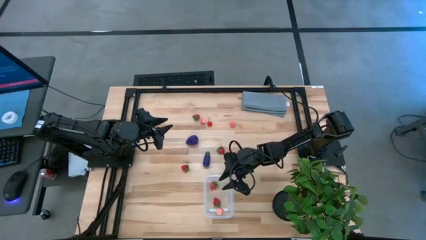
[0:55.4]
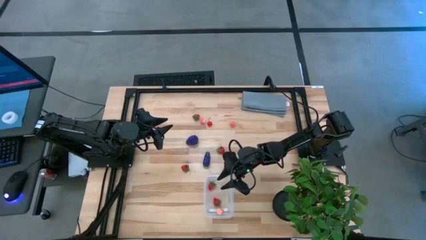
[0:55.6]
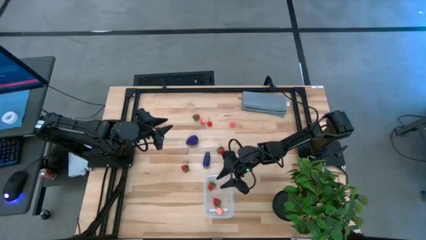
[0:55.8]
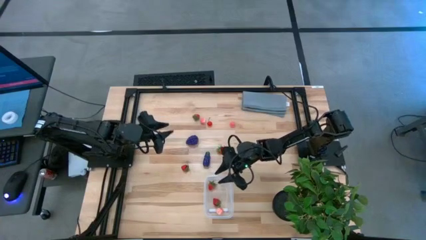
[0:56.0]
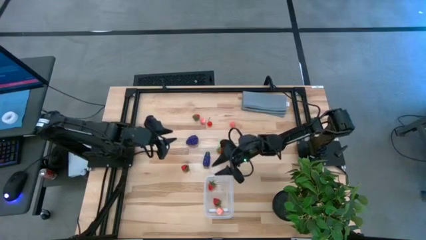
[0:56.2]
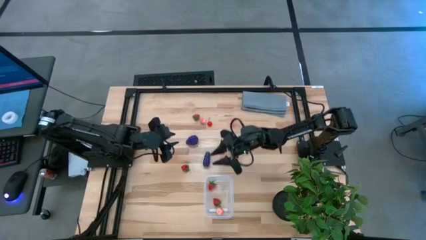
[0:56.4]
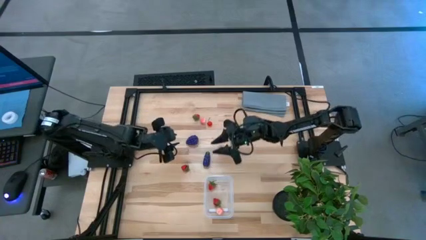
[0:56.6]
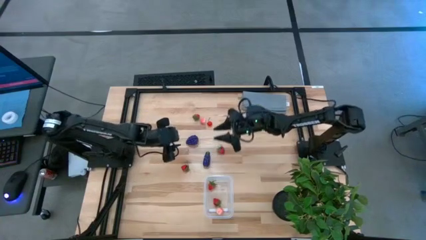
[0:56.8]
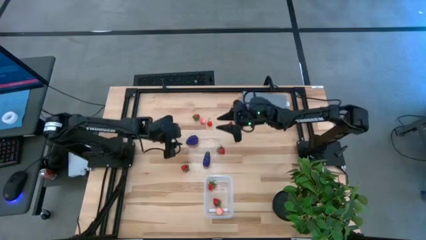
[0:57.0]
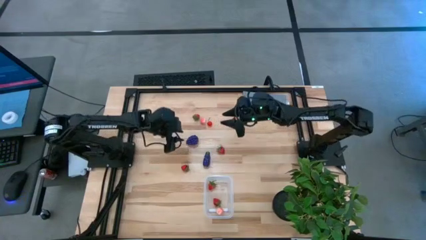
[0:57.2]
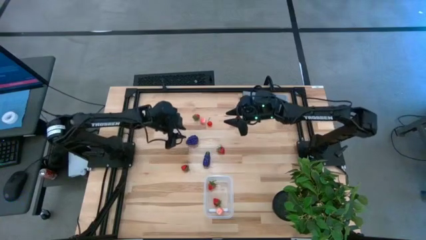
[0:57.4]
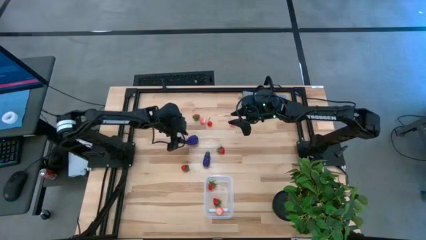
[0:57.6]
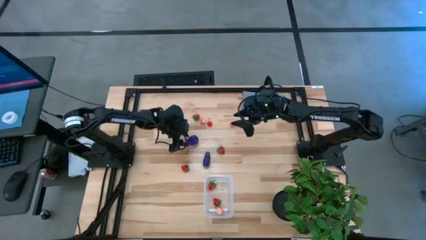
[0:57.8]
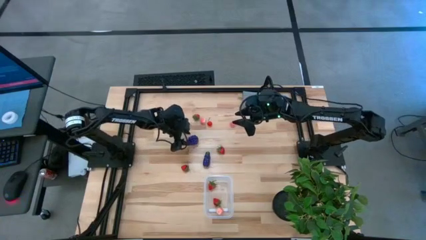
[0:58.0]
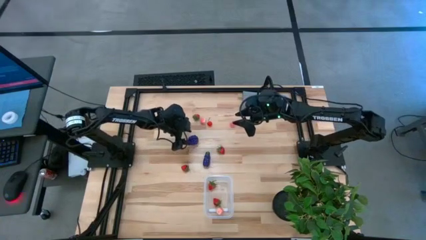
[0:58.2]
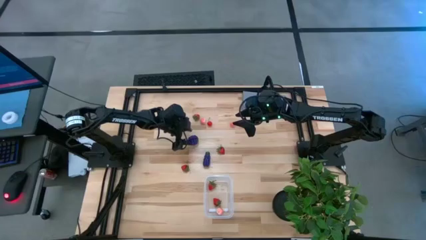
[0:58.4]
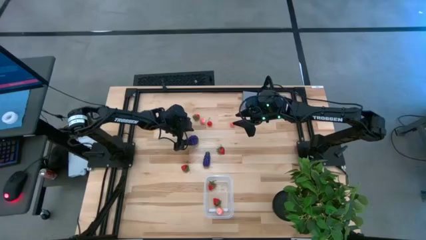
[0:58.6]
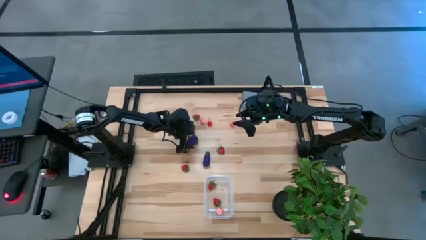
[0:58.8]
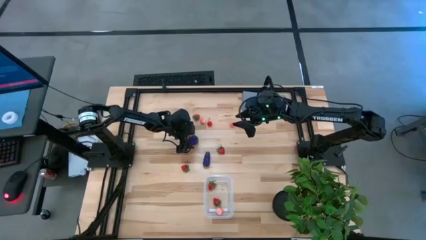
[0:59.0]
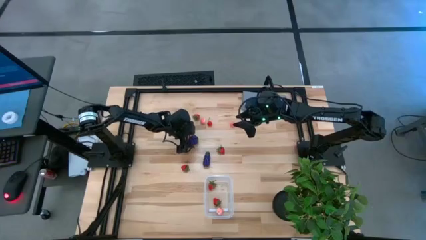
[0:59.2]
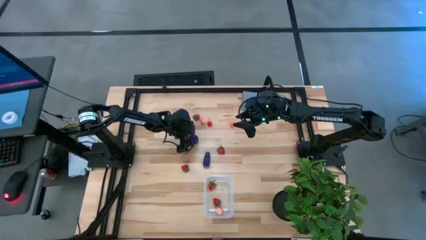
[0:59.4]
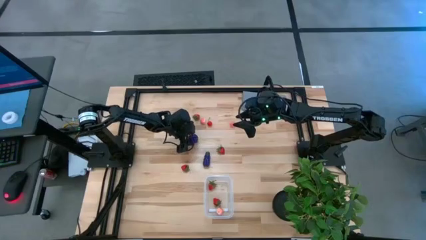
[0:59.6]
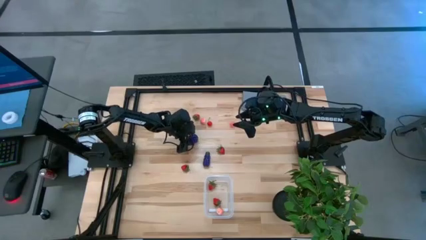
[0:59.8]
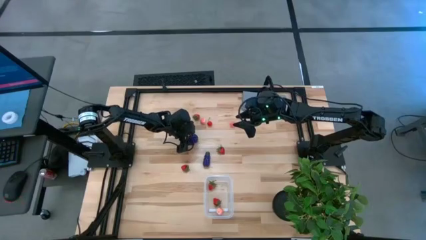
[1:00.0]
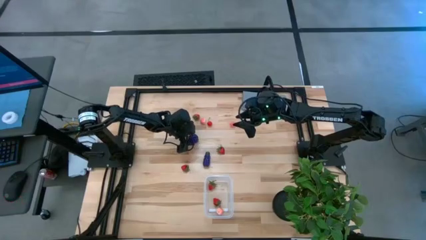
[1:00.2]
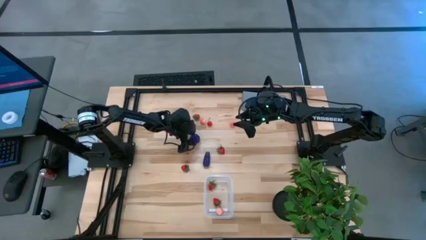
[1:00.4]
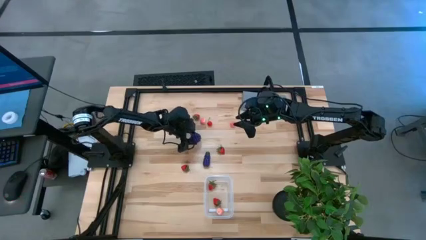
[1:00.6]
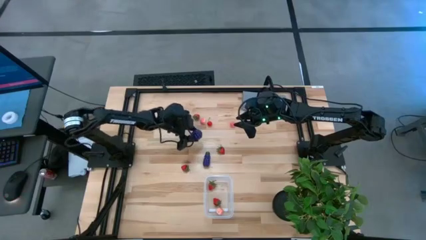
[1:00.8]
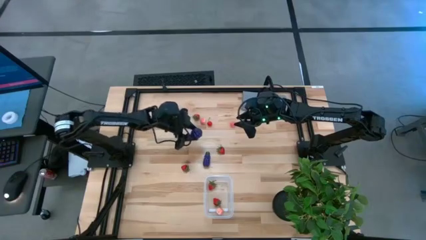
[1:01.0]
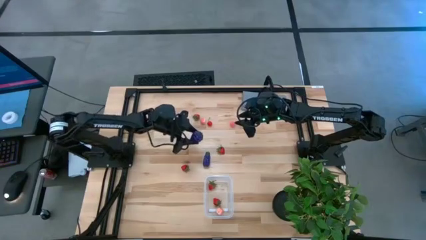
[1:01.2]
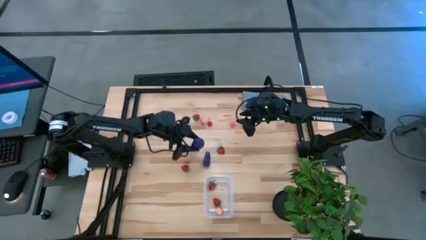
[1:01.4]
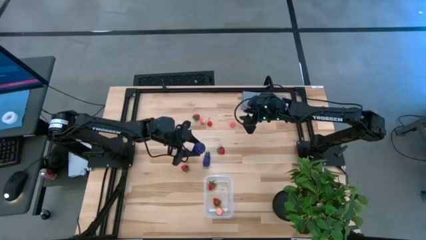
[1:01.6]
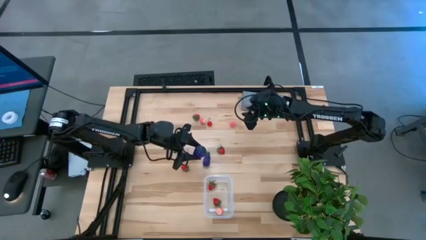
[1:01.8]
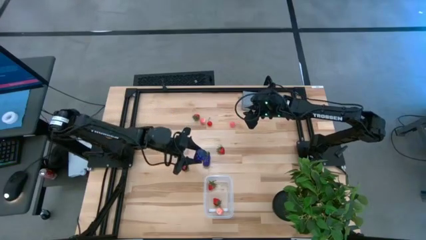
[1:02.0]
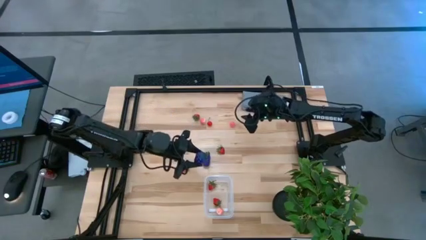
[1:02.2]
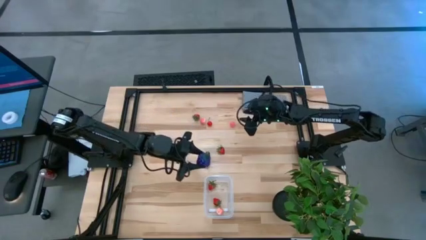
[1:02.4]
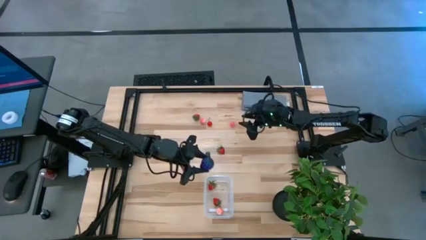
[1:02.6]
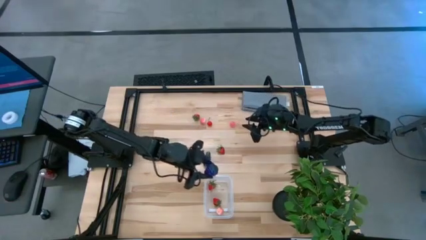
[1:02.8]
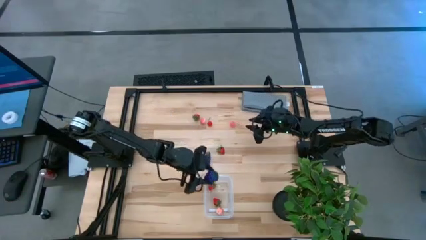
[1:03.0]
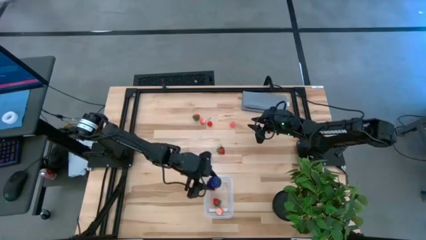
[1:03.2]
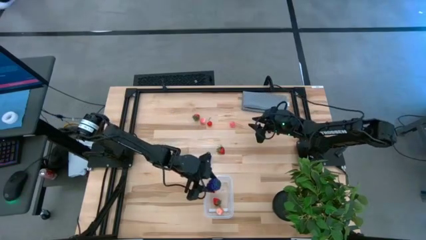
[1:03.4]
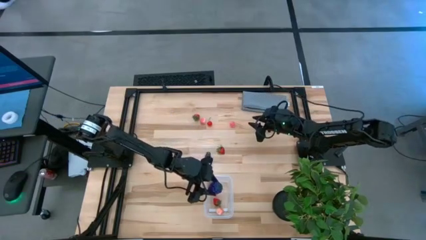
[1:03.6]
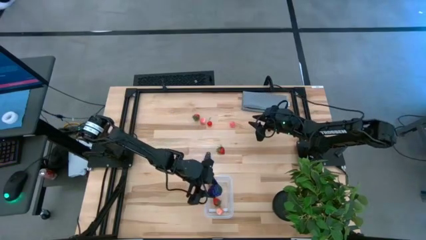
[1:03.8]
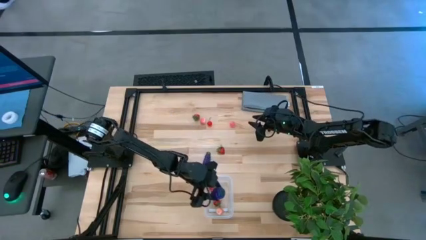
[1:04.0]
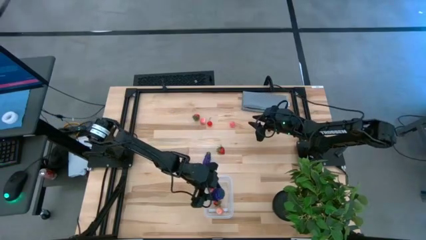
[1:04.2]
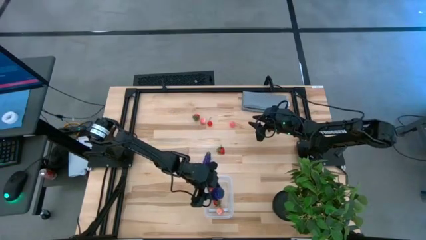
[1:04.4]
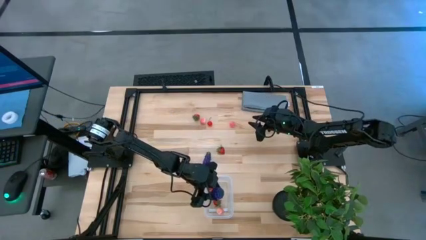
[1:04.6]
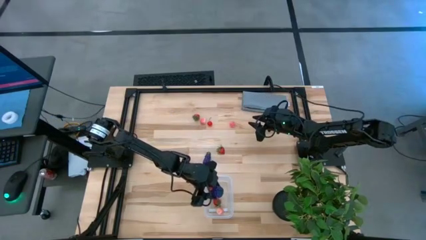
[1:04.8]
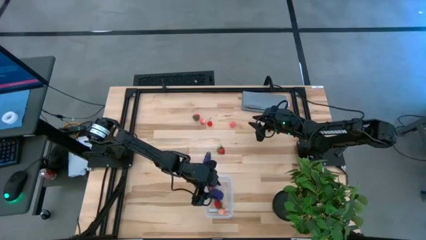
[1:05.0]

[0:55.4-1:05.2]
Task: Pick and placing Produce into tupperware
Put the violet grapes into the transparent bin

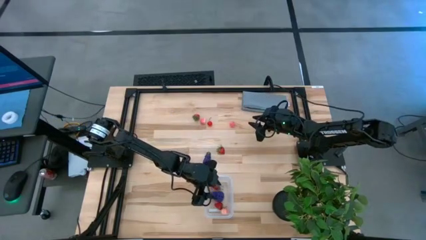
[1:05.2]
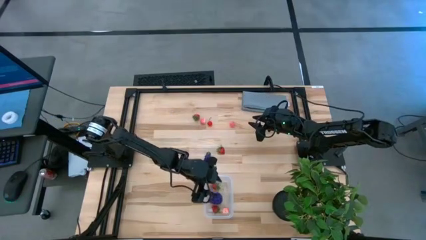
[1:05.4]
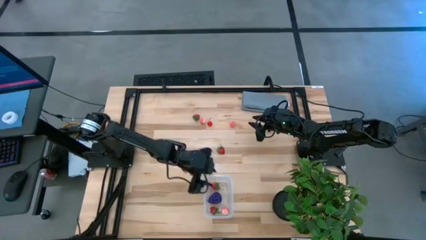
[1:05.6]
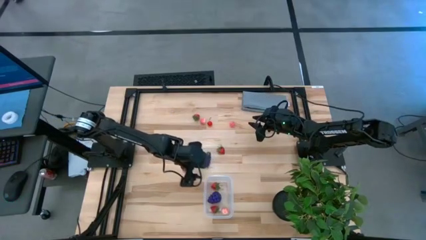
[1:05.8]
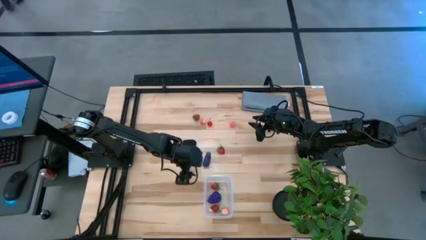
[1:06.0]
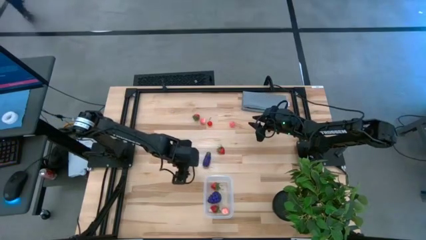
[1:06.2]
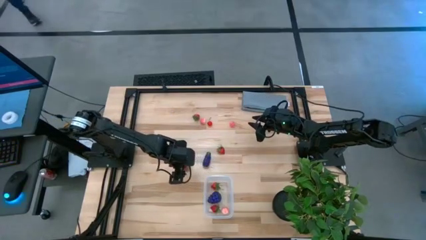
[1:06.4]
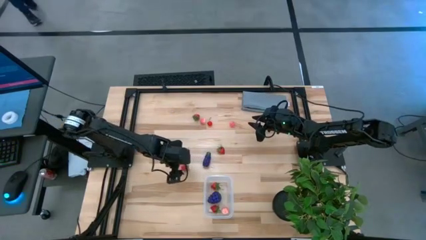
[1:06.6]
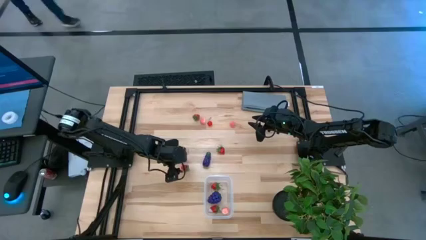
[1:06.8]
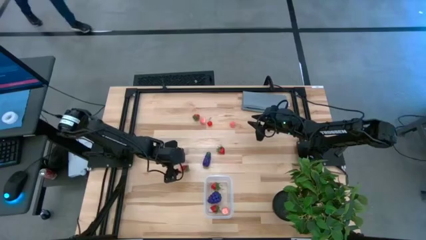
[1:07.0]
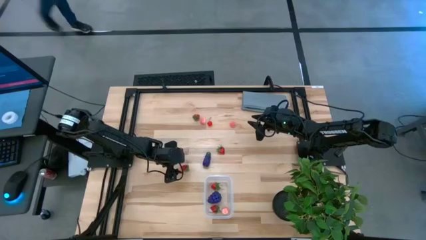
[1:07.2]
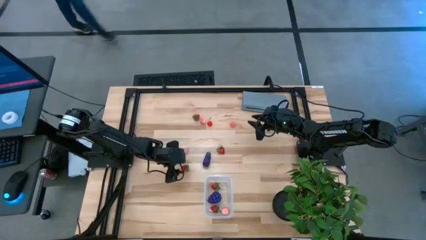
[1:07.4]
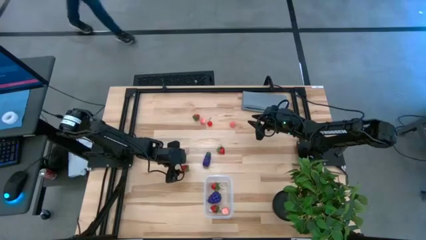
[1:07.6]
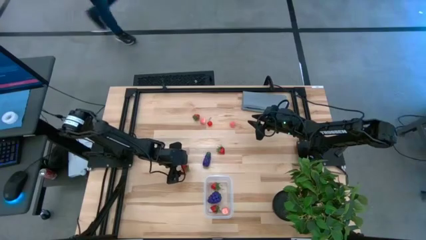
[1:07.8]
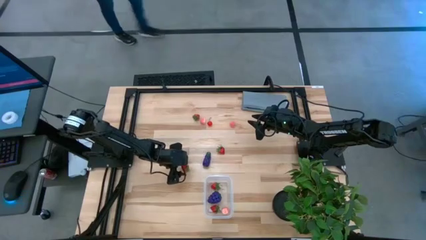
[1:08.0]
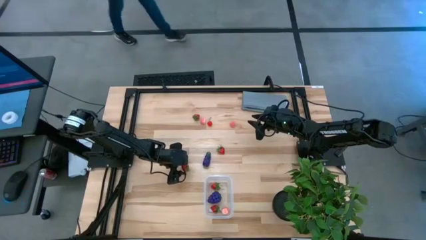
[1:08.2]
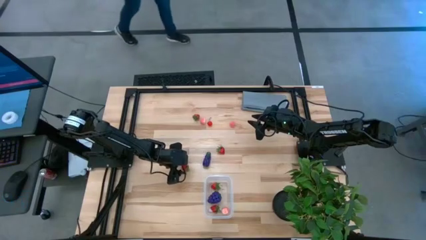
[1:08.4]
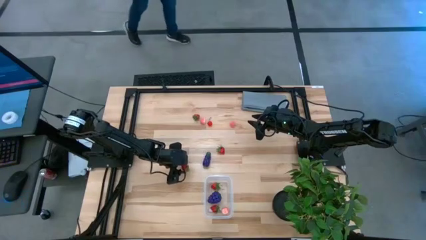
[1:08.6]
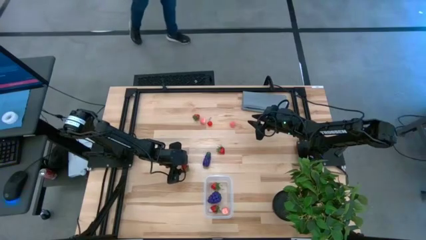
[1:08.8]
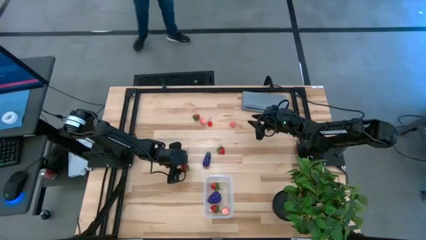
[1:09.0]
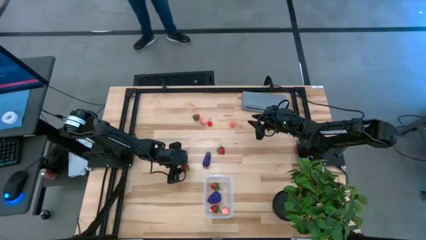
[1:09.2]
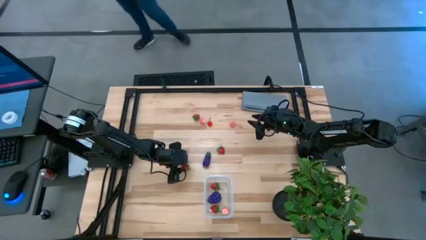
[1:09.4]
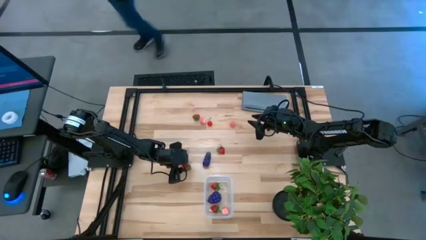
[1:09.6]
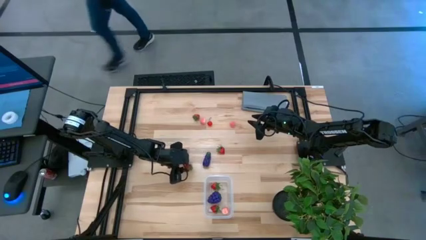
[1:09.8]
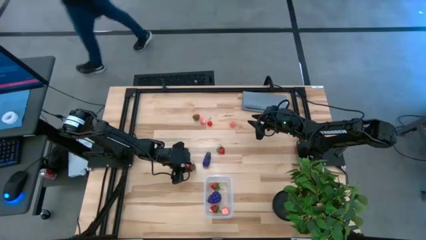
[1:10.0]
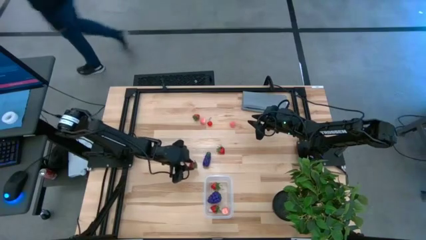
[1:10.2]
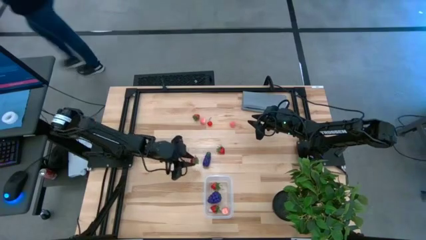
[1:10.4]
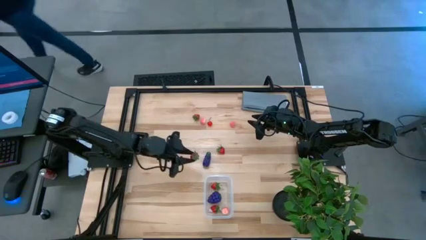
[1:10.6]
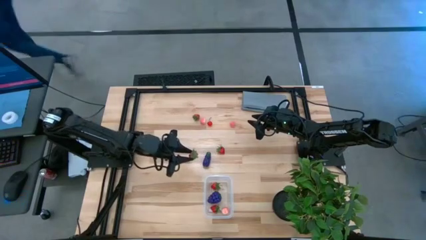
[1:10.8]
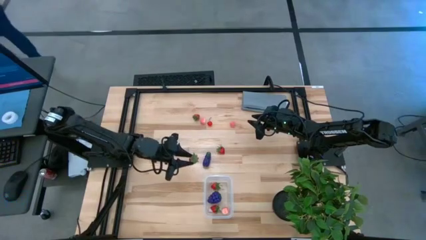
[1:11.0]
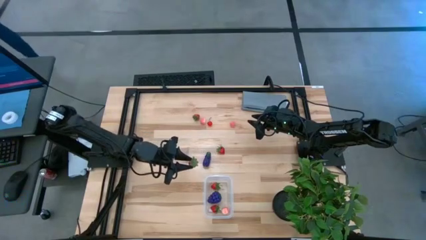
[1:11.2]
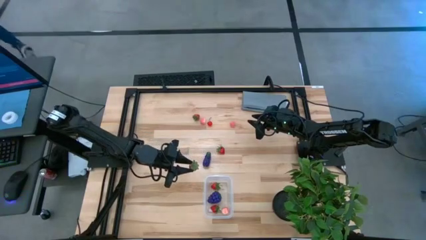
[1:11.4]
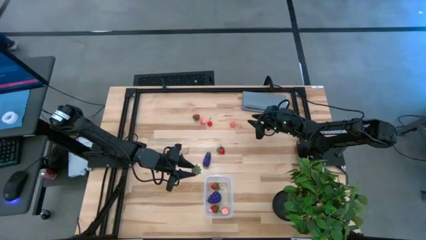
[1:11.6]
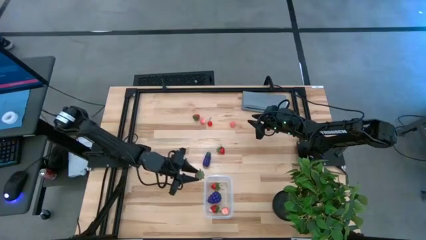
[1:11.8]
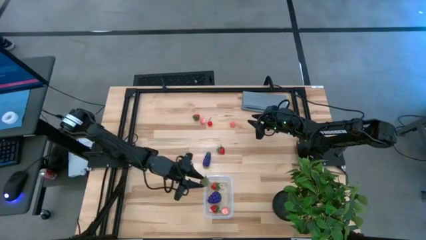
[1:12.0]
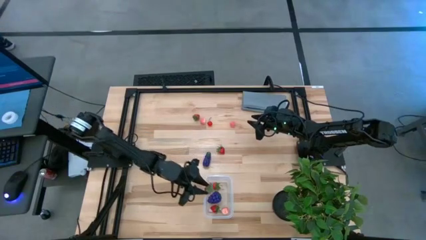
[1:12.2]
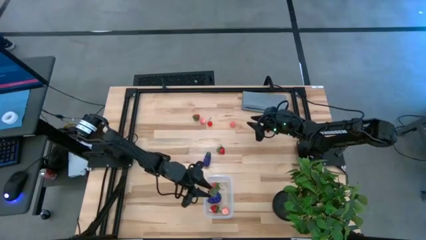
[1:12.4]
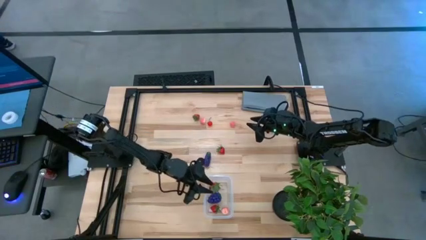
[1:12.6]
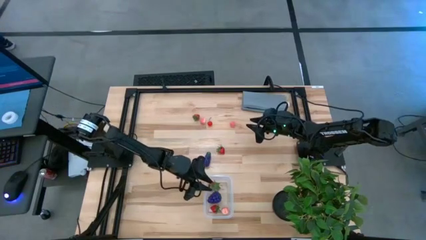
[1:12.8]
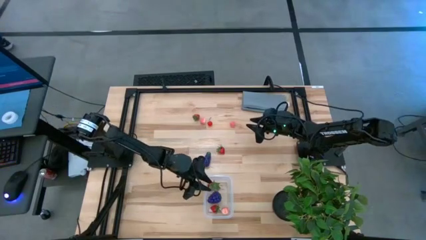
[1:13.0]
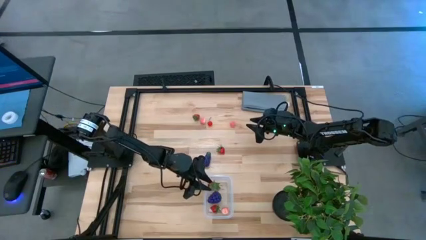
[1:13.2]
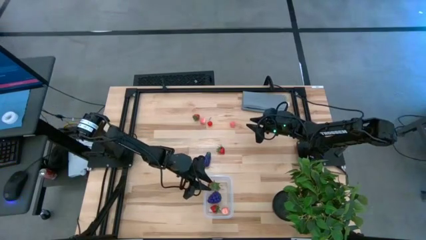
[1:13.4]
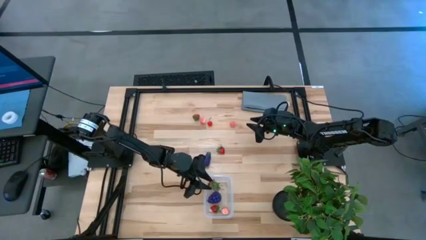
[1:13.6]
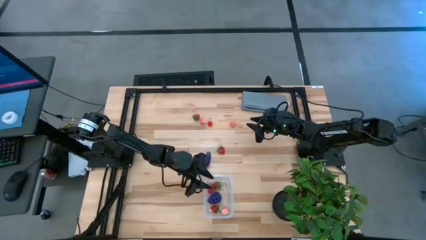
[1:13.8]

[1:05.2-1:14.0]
Put the red strawberry into the transparent bin
